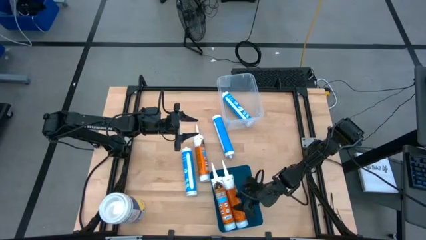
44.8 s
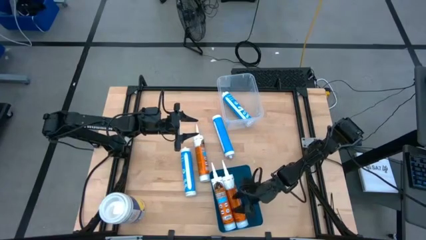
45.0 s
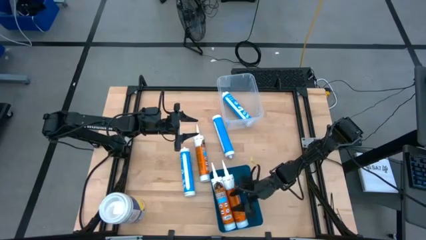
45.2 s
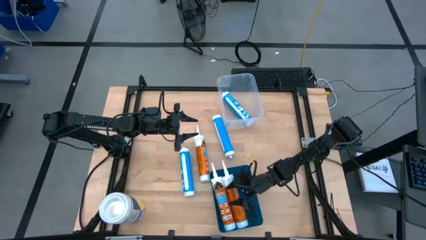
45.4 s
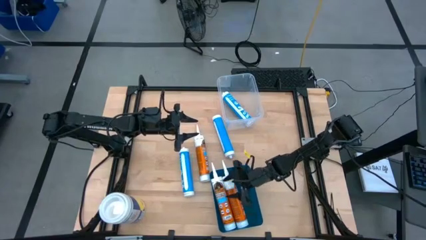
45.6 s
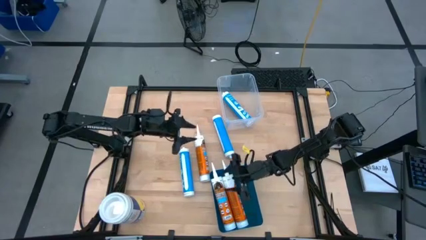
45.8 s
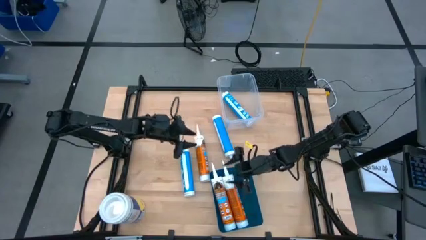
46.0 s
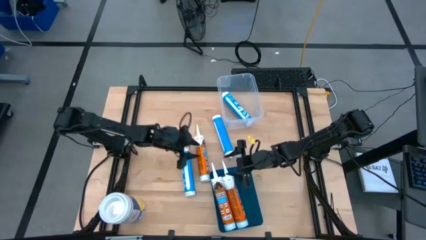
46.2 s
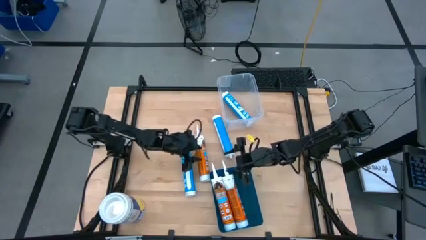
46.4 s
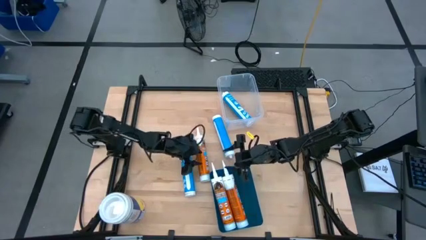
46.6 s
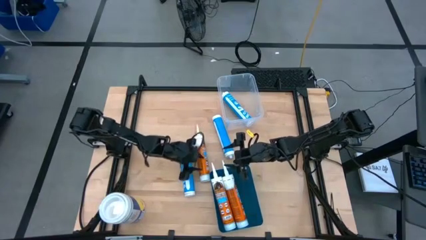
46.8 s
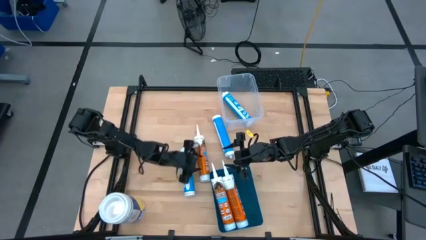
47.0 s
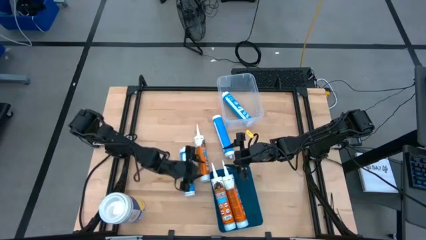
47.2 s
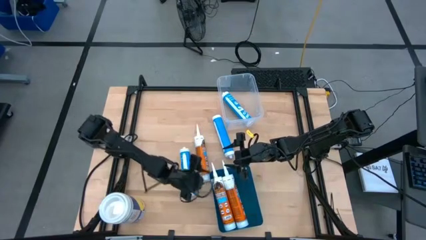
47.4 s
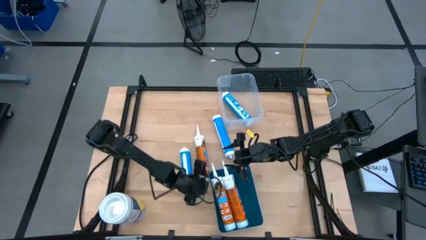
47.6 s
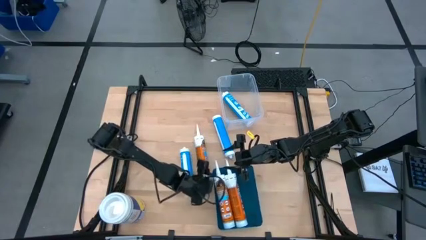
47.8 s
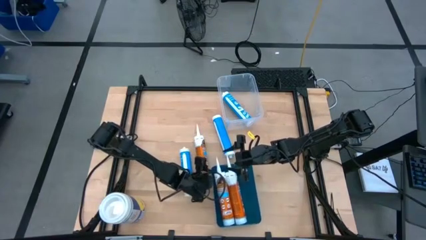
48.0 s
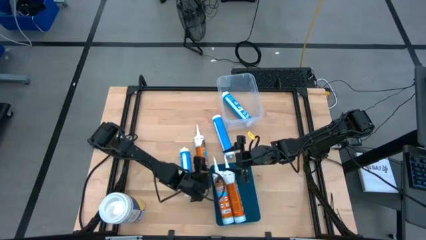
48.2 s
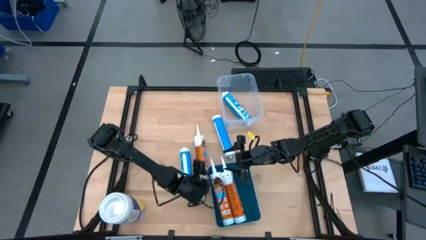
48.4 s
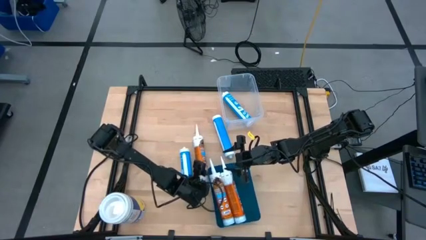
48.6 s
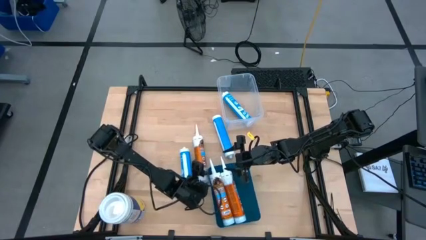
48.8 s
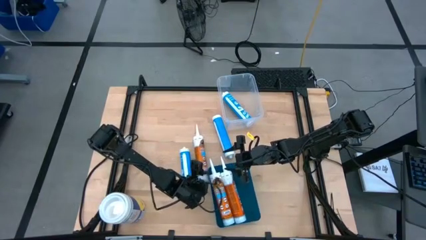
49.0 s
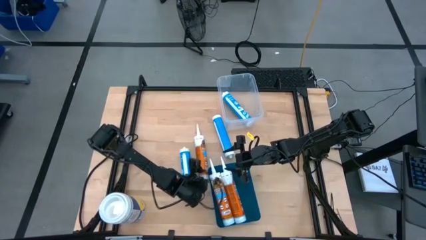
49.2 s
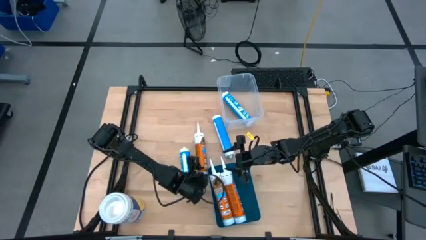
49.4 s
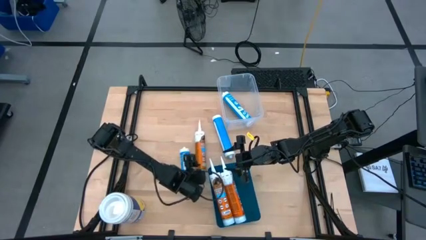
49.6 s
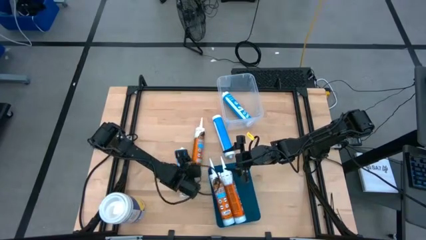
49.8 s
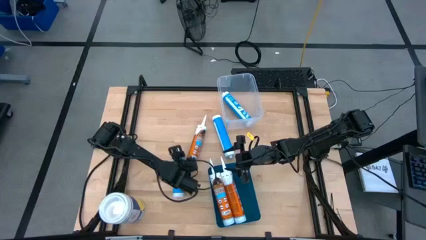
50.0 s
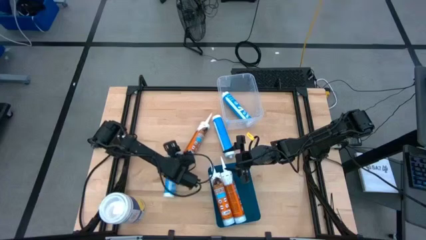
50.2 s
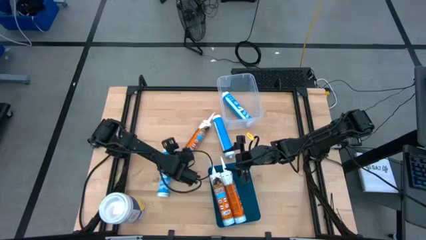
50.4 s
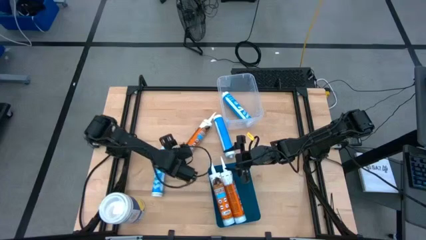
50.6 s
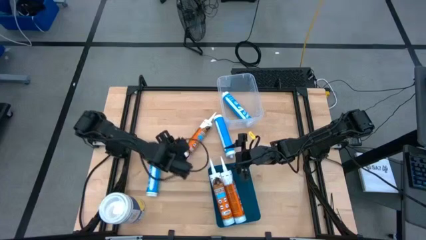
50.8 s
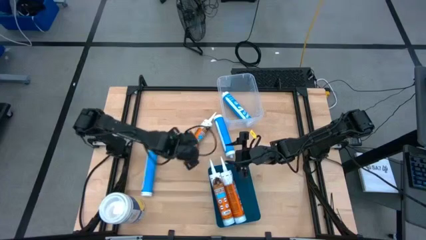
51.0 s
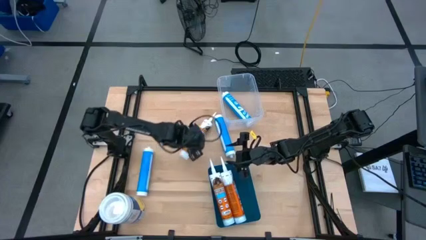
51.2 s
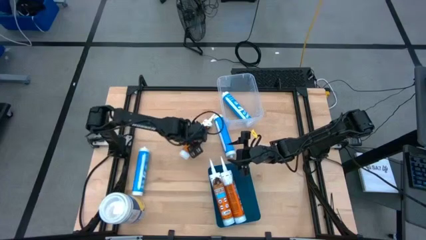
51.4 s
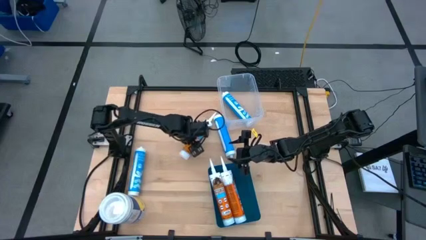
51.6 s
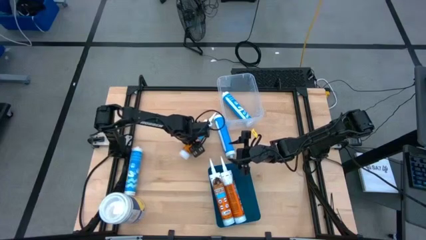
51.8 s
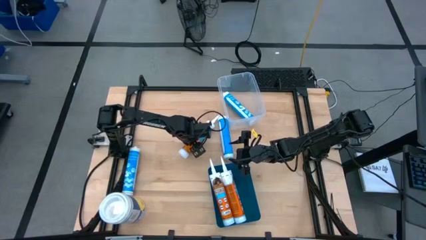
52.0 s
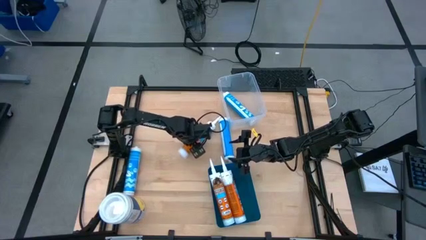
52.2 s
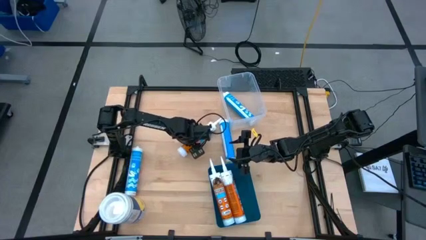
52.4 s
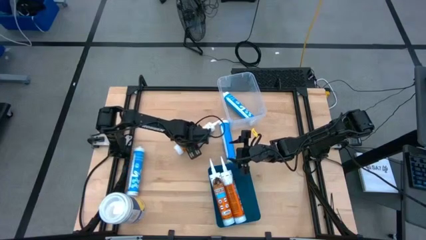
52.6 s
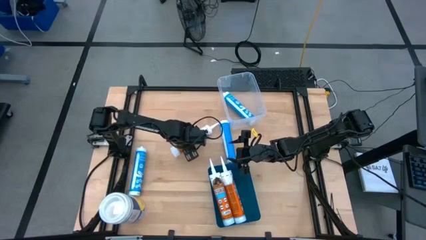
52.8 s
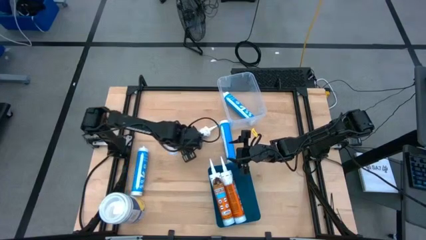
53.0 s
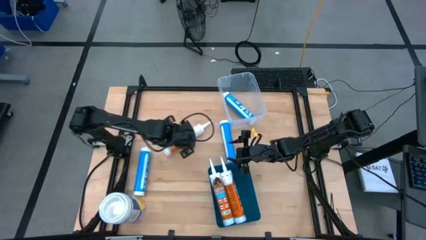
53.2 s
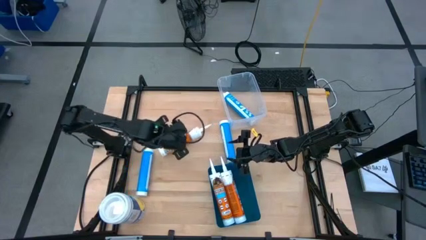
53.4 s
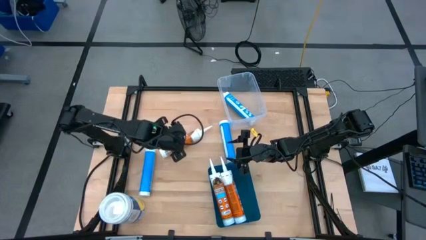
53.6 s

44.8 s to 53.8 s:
Task: Sort silicone sealant tubes
Put the orange sealant into the blue bin
